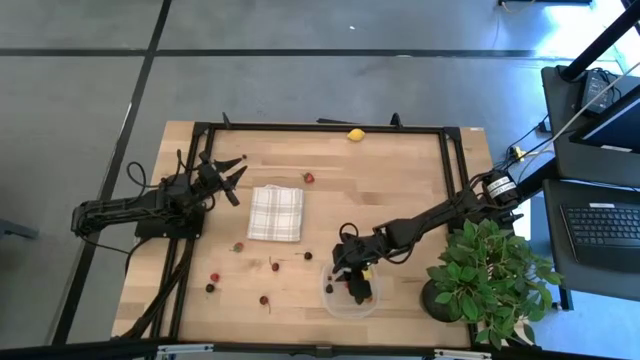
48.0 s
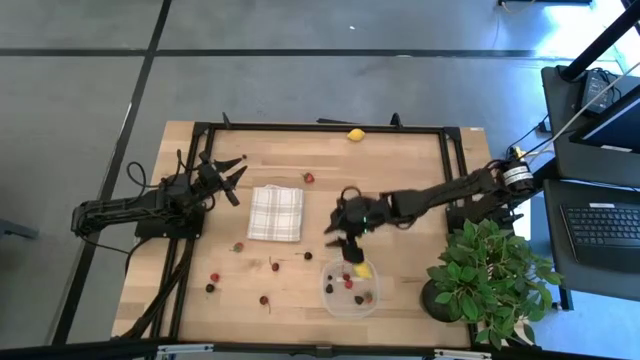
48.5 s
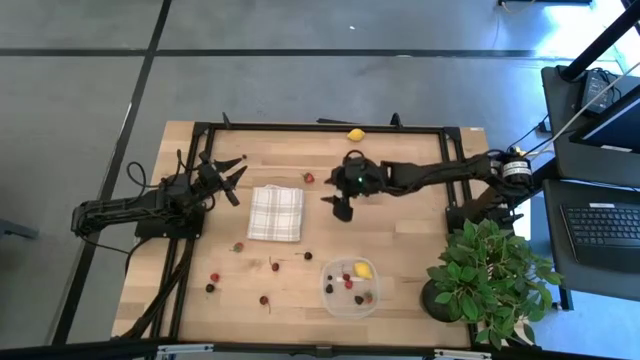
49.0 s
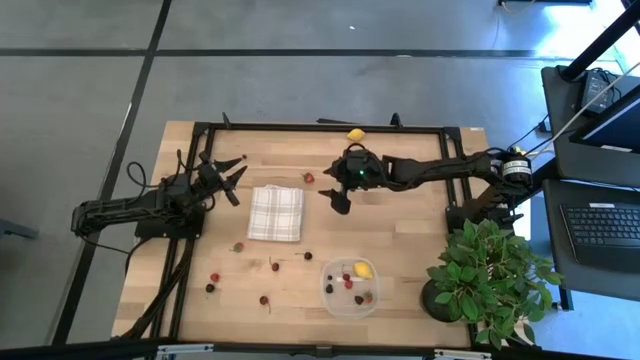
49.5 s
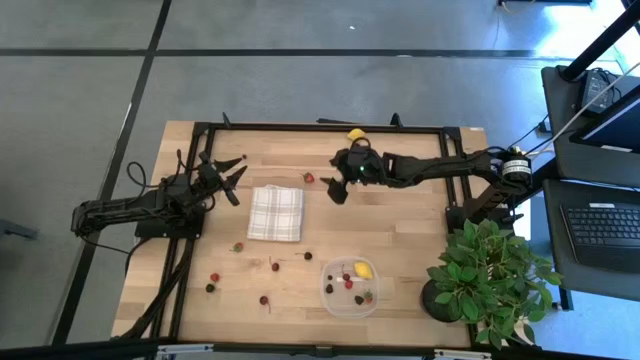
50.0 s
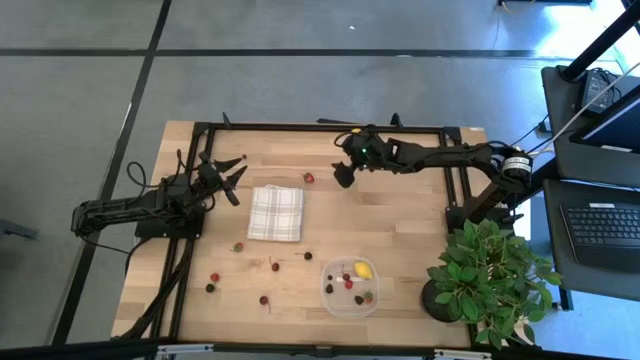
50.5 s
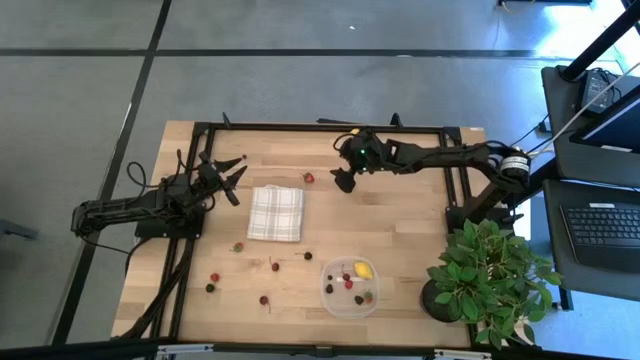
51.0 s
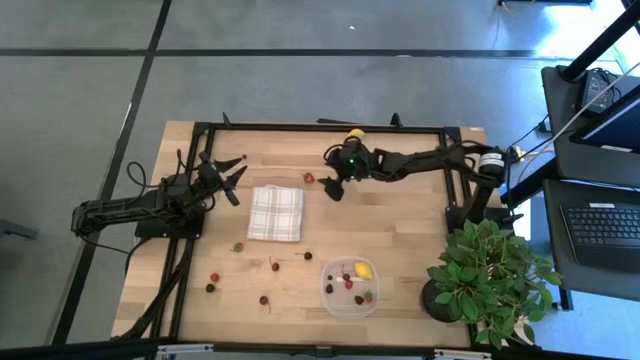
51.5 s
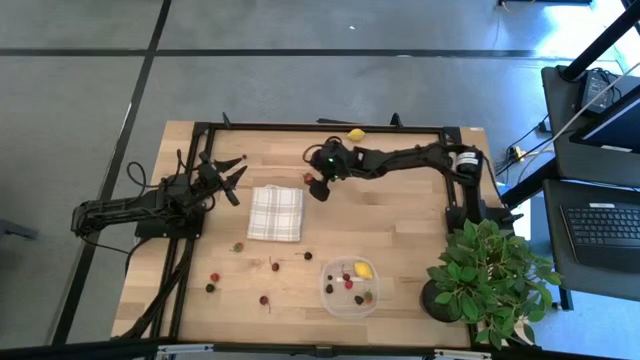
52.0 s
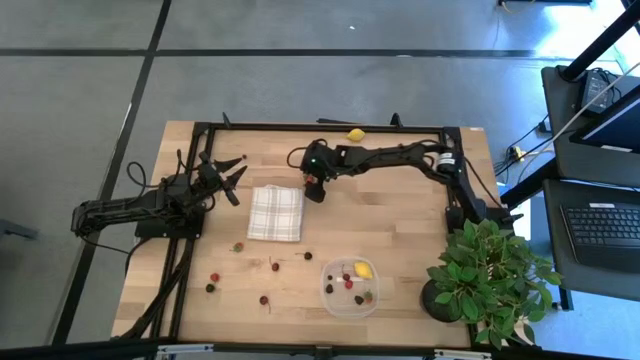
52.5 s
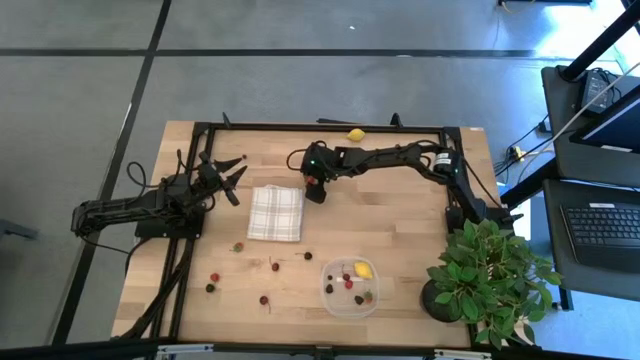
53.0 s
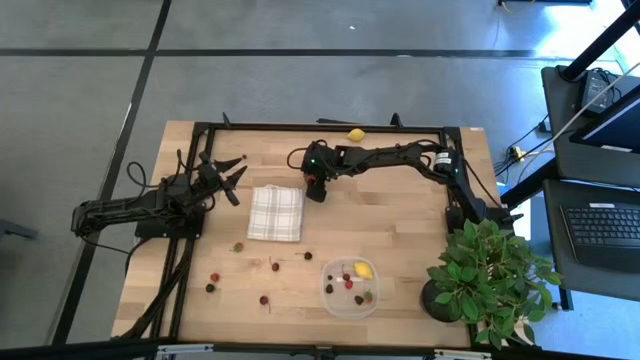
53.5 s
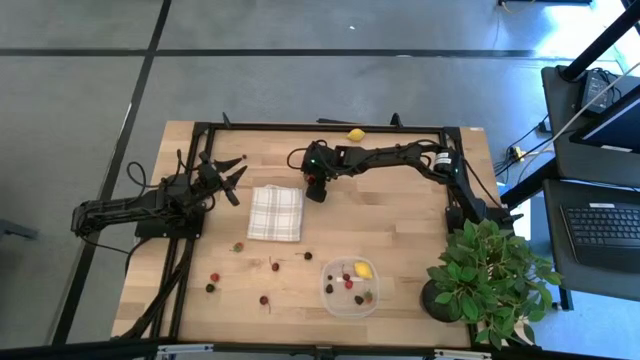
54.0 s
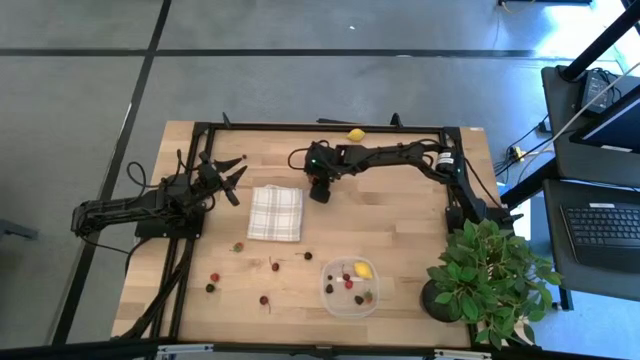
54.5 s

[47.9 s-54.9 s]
Task: Pick and placing Produce into tupperware
Put the top strawberry into the transparent container

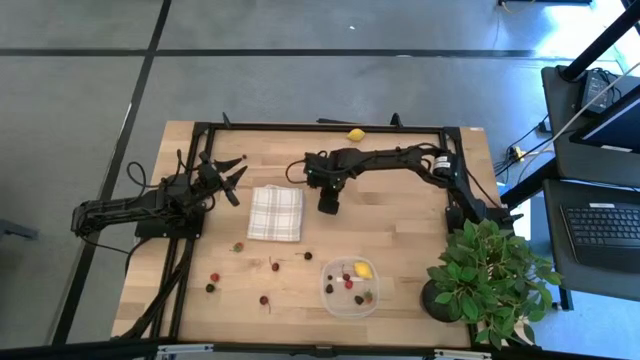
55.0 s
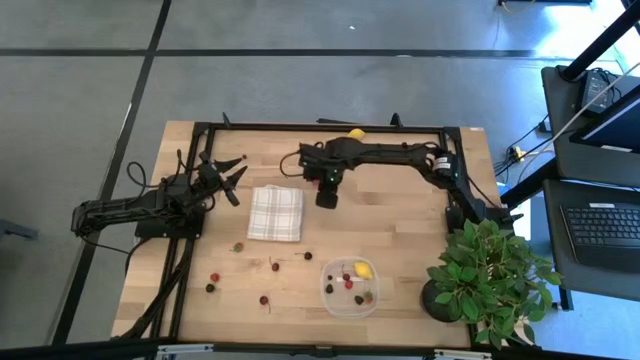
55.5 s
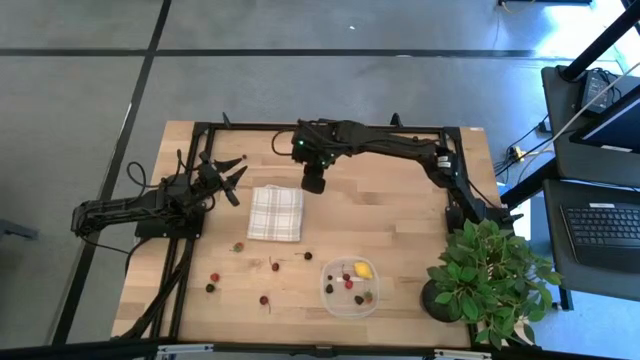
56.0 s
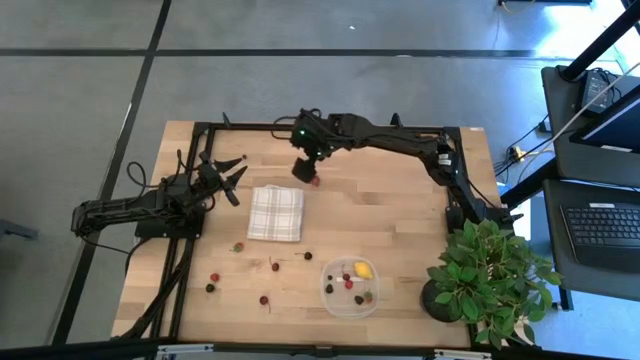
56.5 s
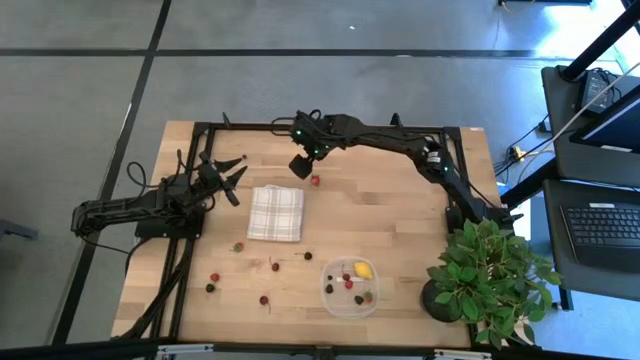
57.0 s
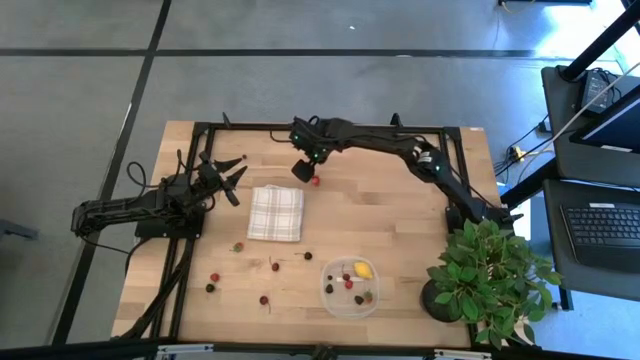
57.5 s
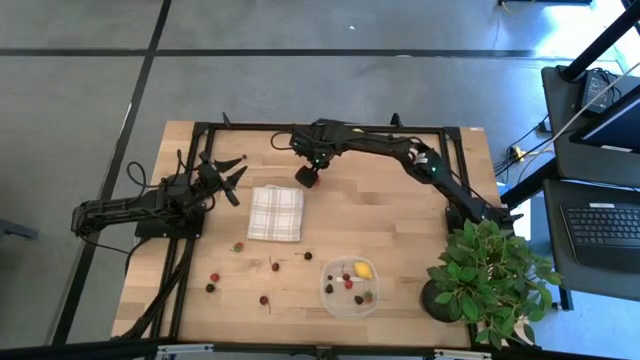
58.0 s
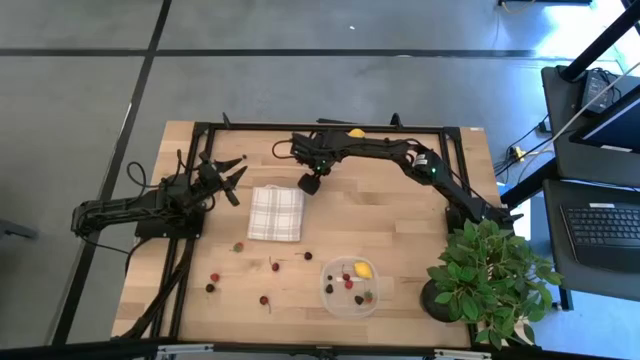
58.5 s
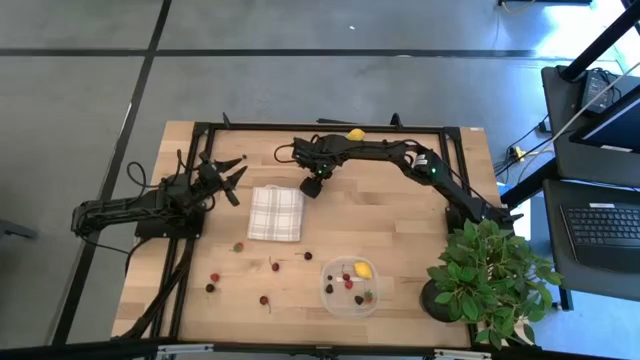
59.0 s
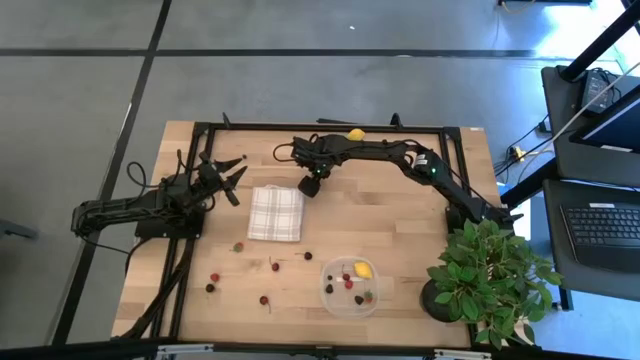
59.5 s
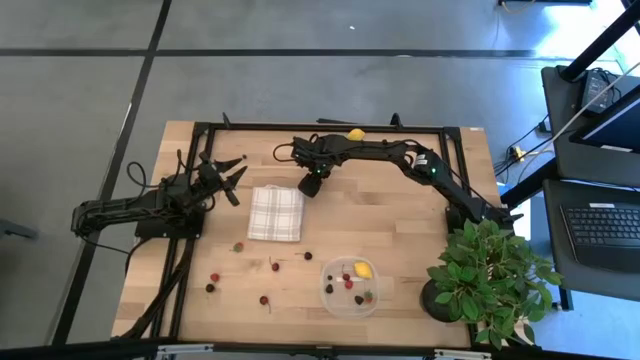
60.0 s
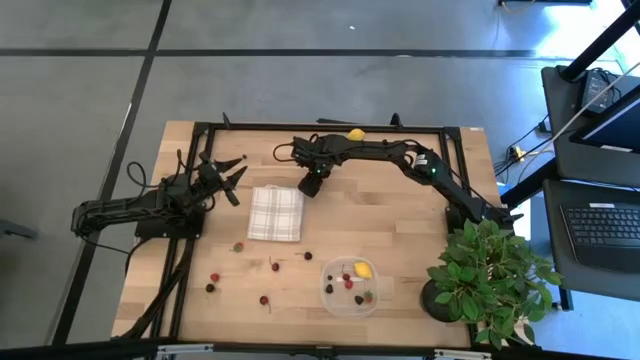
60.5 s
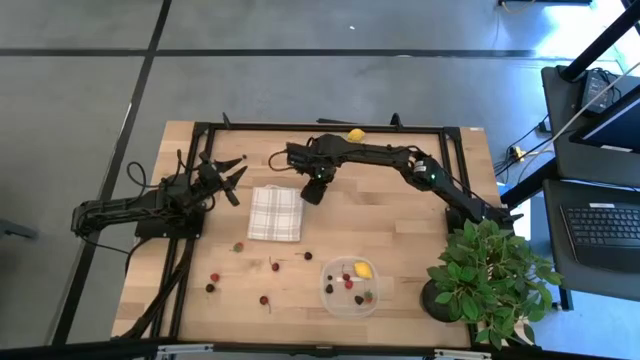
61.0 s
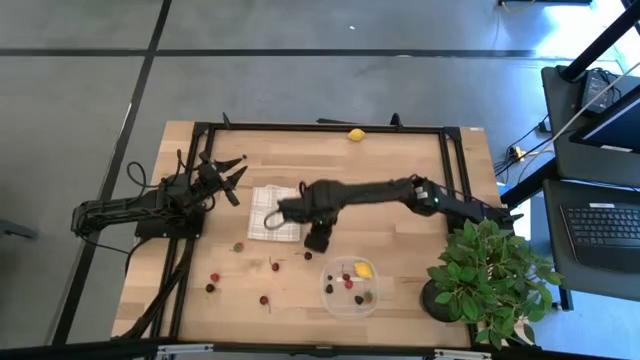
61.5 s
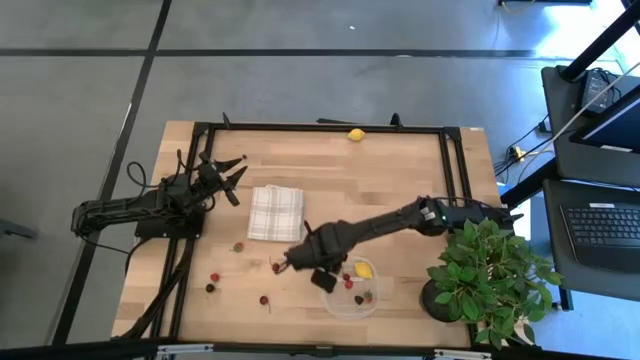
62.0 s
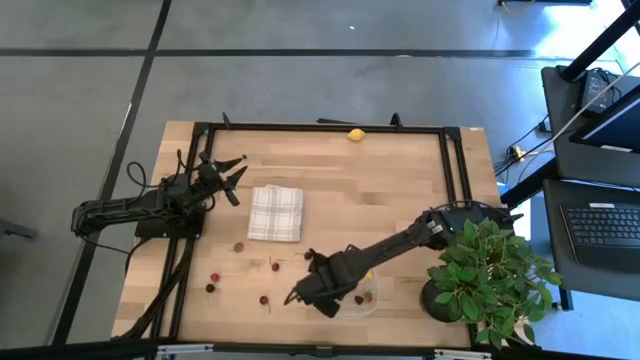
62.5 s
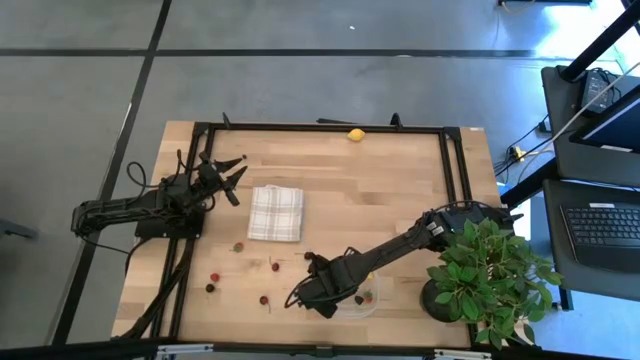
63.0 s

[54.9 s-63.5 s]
Put the top strawberry into the transparent container

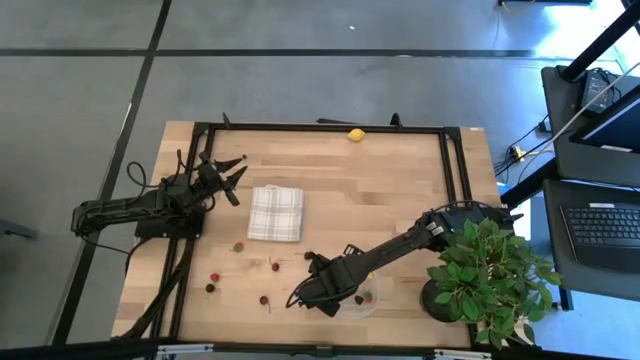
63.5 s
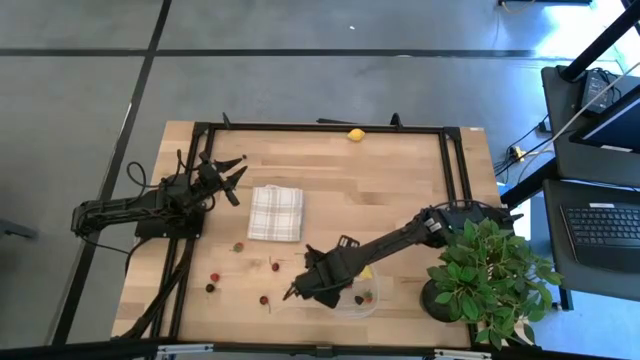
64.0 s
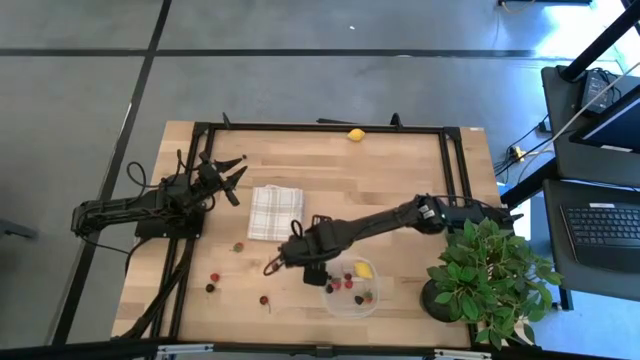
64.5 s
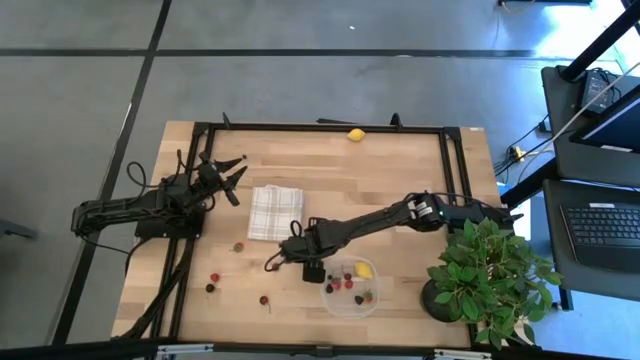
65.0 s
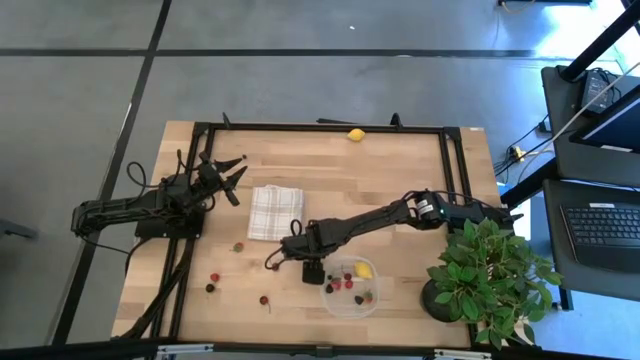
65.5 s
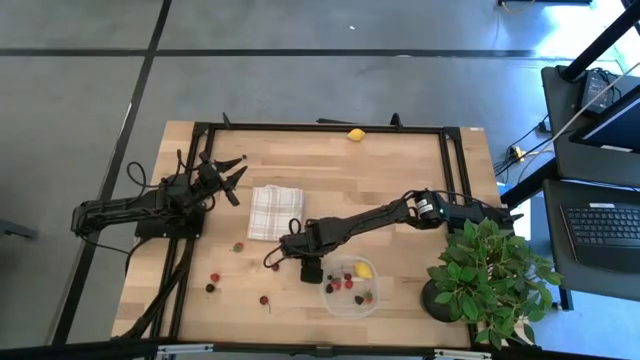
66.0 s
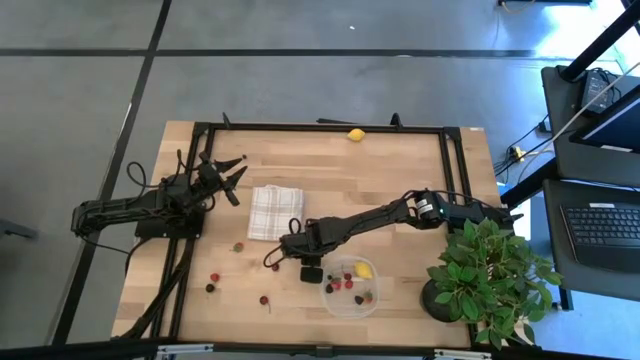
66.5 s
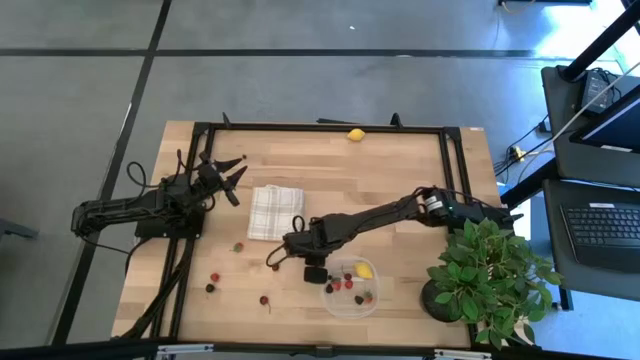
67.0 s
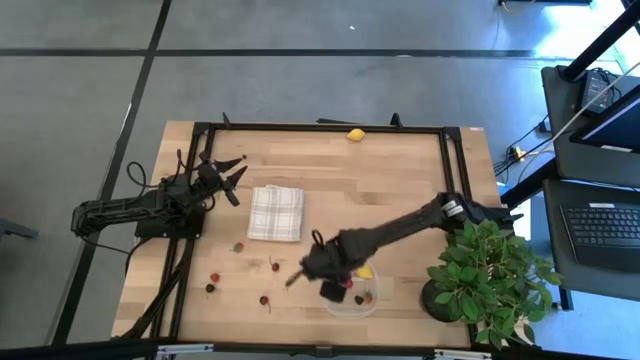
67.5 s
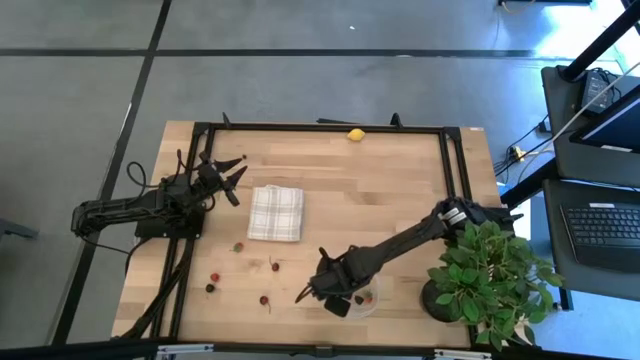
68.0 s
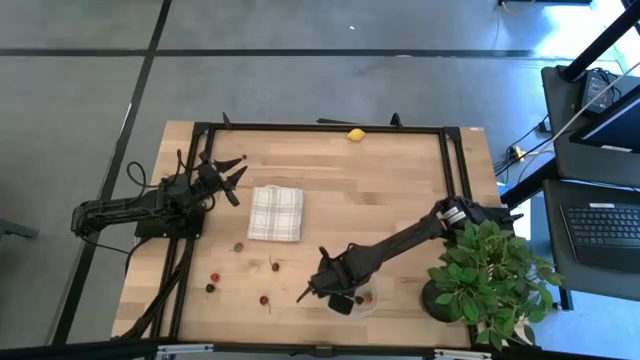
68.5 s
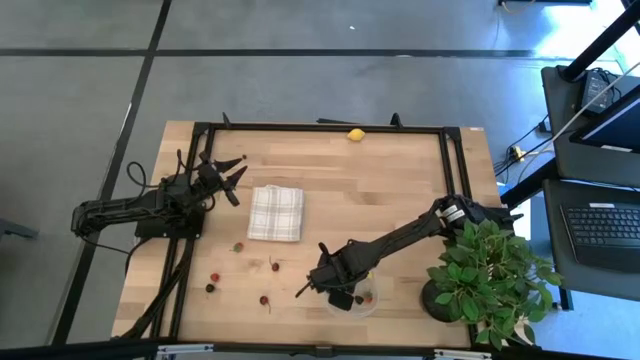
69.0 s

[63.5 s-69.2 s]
Put the top black cherry into the transparent container
